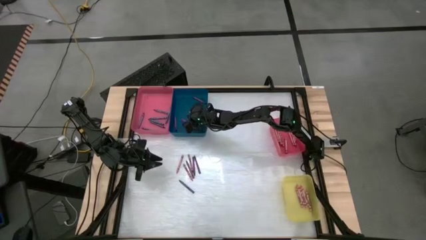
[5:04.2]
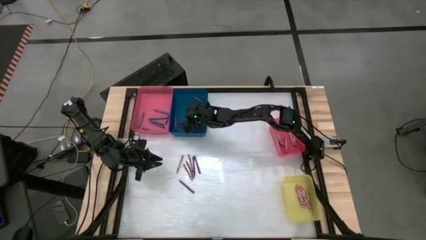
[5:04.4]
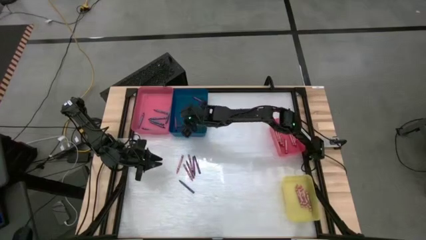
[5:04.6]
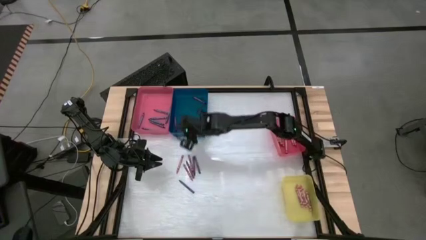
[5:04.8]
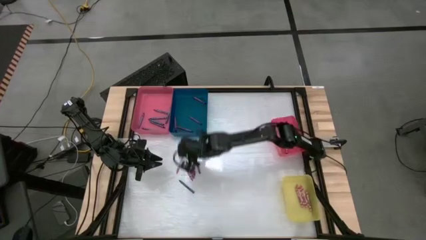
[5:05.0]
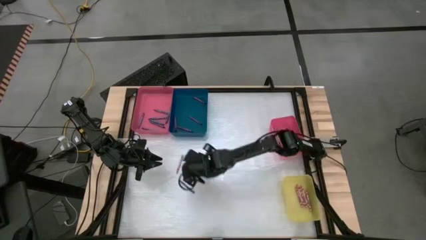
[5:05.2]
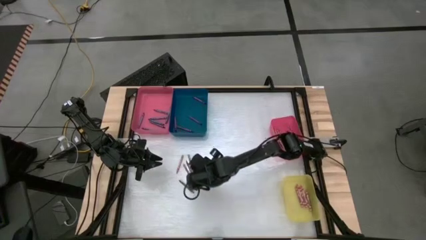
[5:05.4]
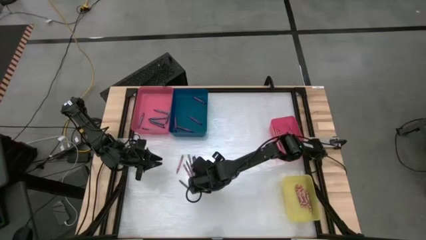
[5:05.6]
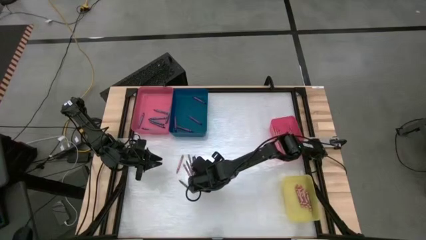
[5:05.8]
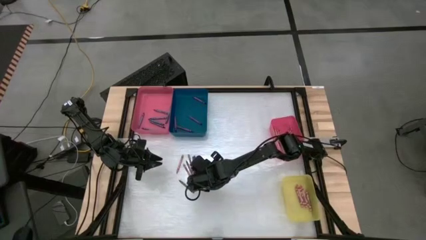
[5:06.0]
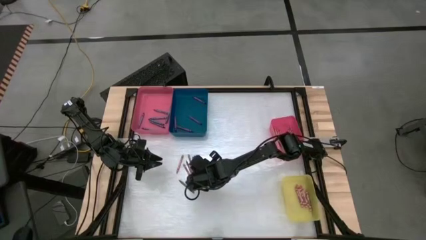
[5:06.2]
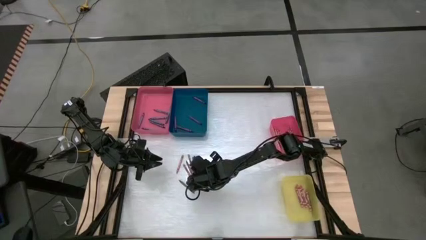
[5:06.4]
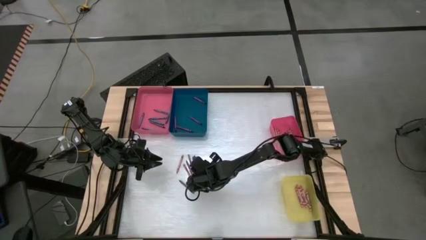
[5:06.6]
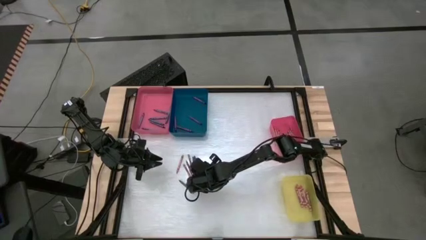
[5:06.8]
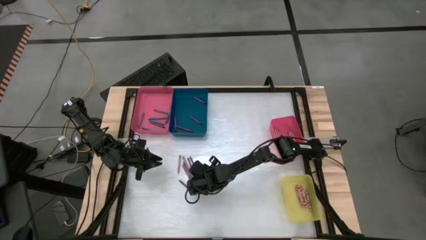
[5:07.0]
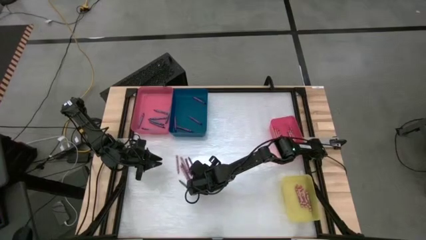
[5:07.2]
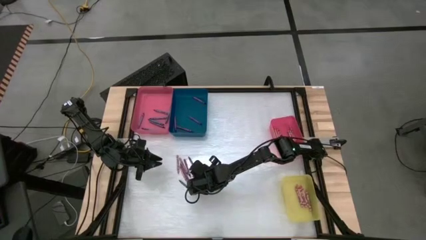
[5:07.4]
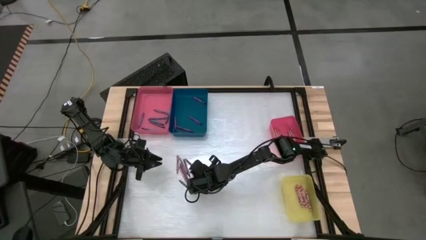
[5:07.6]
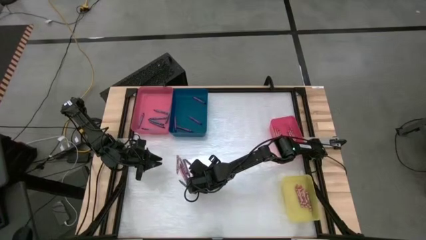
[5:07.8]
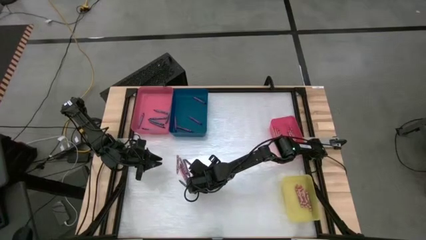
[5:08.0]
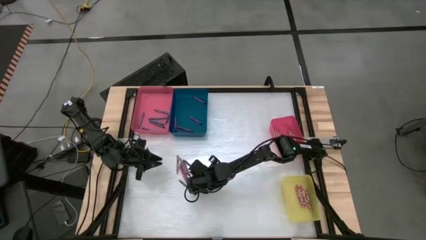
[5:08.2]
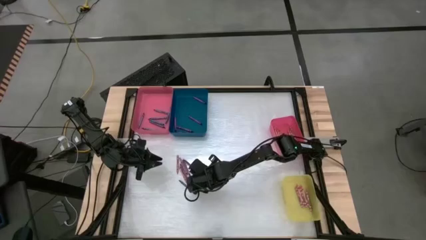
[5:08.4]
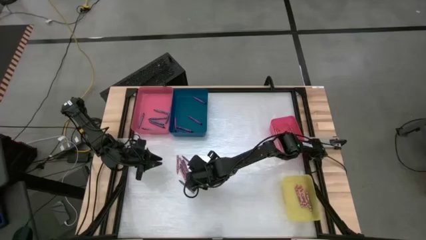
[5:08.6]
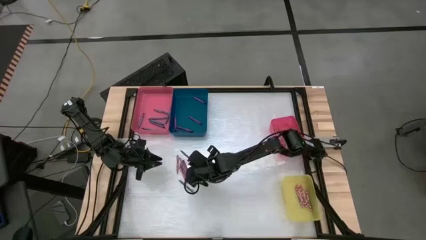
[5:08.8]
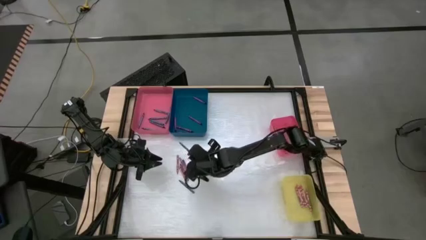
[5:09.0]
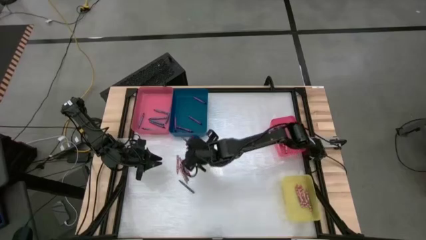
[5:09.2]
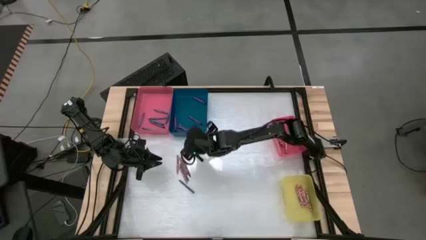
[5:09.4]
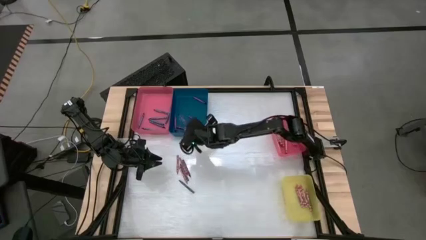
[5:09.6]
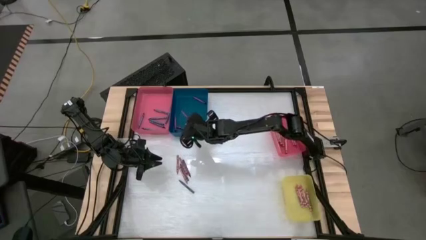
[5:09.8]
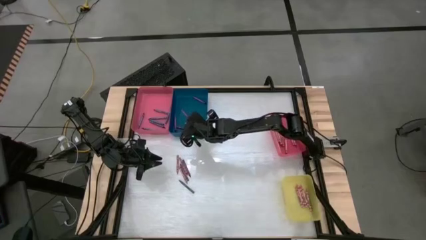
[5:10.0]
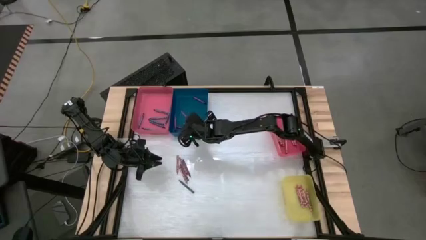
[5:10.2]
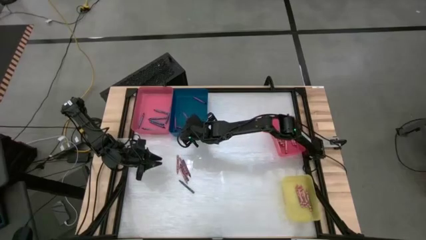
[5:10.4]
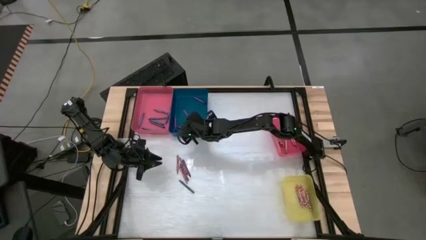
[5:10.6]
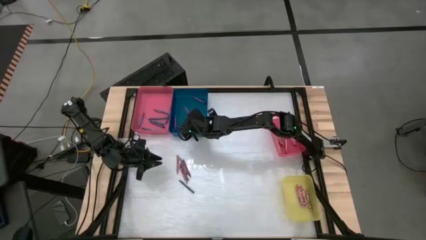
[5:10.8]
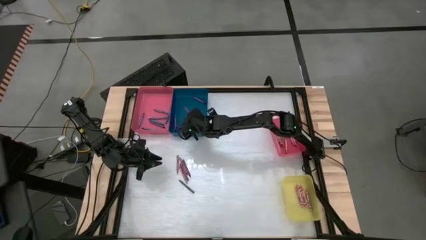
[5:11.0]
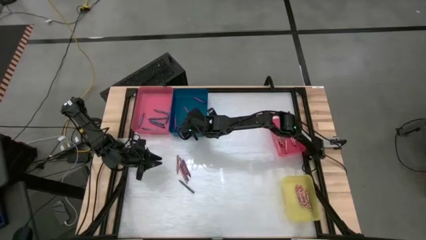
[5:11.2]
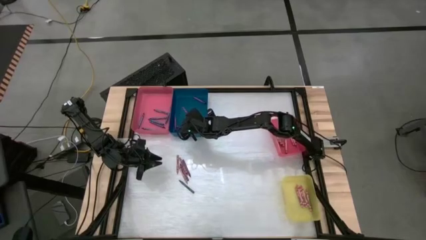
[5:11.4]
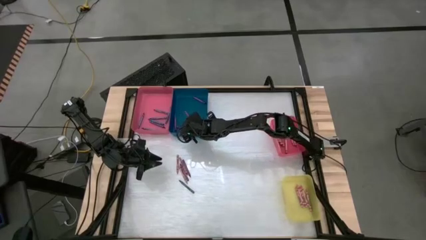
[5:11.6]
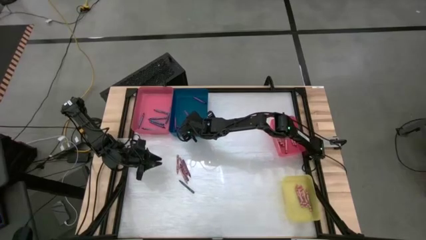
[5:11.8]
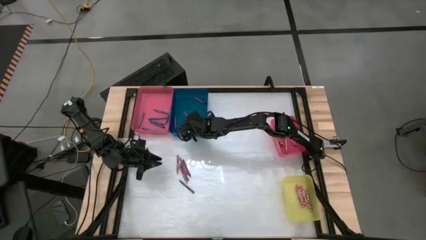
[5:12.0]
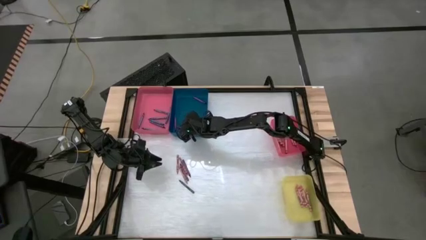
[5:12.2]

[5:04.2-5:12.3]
Task: Sort crayons
Put the purple crayon into the blue bin

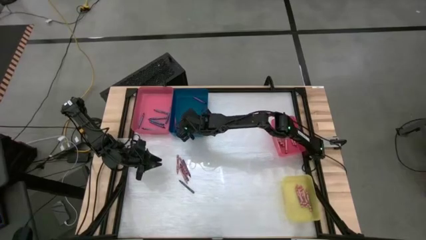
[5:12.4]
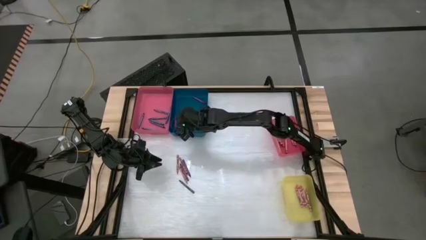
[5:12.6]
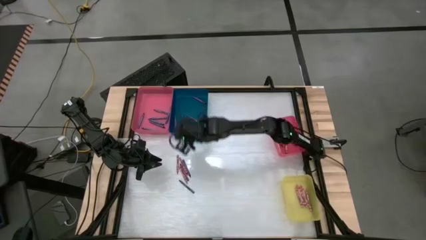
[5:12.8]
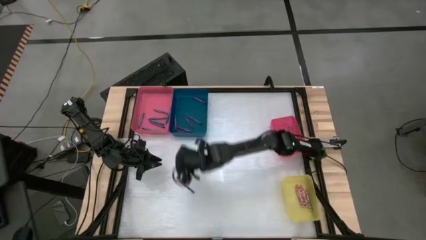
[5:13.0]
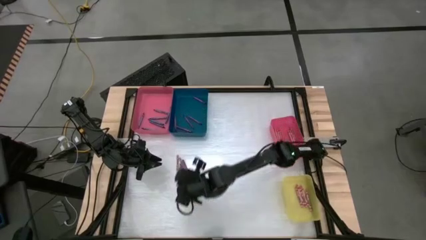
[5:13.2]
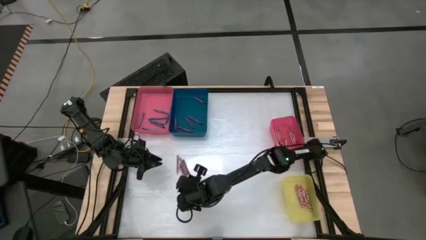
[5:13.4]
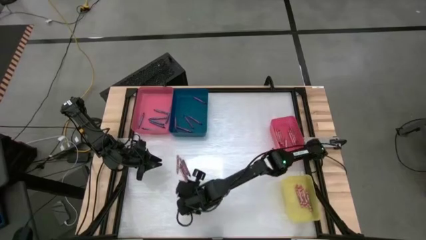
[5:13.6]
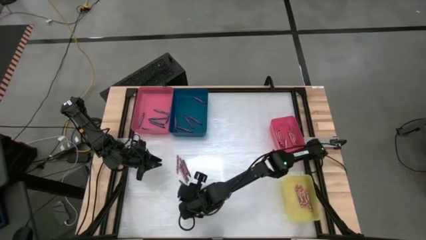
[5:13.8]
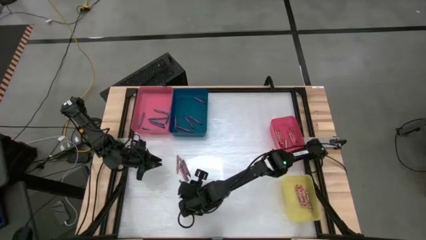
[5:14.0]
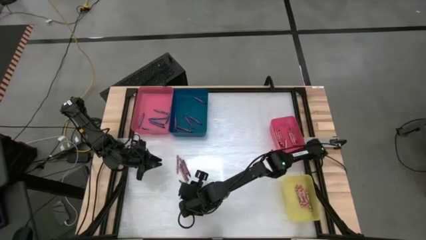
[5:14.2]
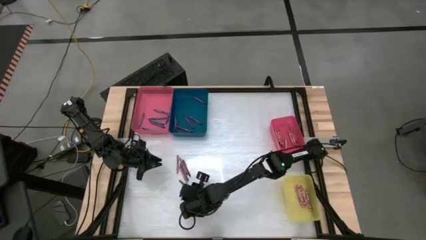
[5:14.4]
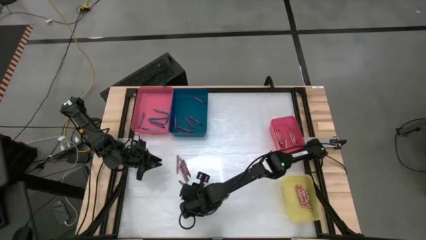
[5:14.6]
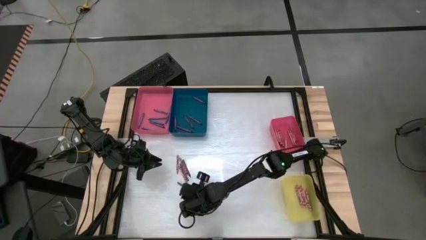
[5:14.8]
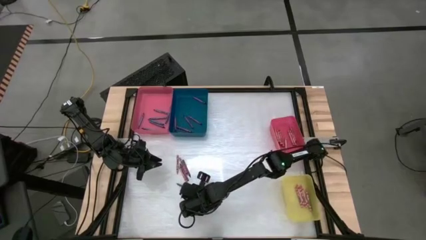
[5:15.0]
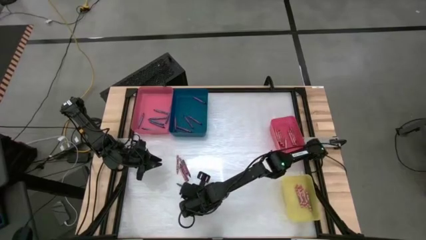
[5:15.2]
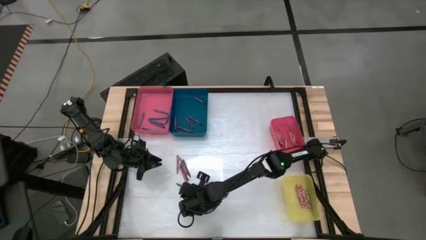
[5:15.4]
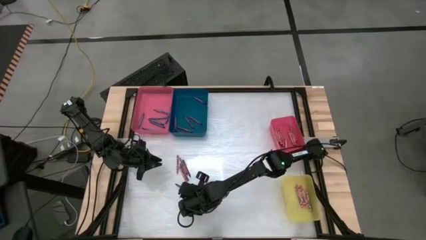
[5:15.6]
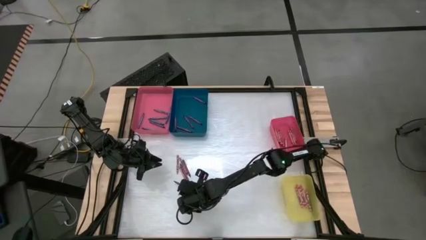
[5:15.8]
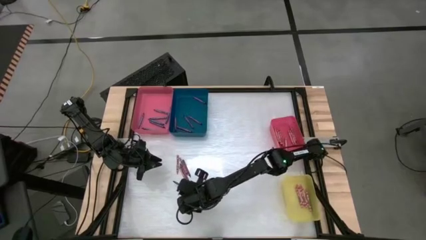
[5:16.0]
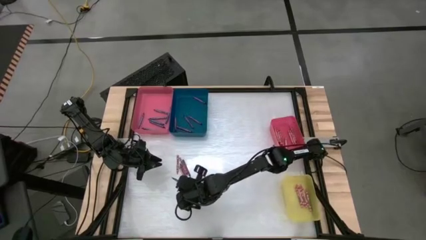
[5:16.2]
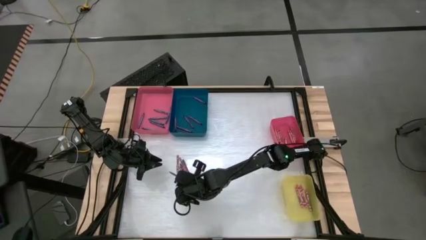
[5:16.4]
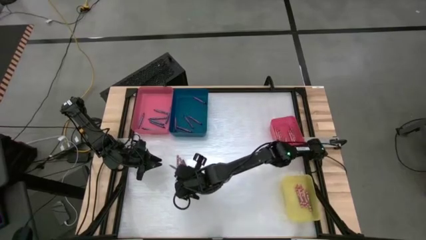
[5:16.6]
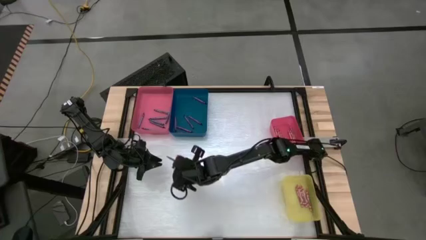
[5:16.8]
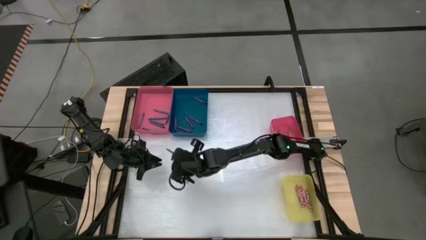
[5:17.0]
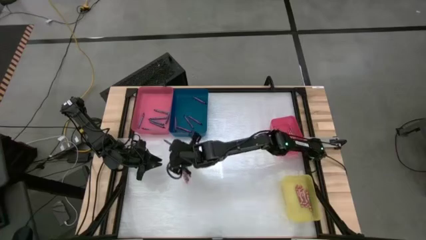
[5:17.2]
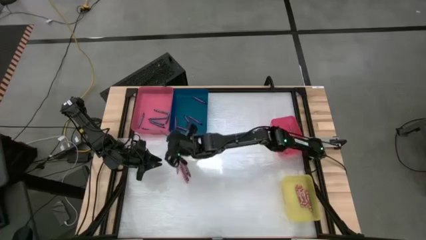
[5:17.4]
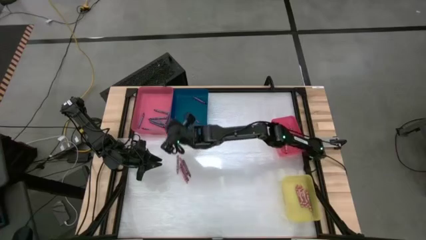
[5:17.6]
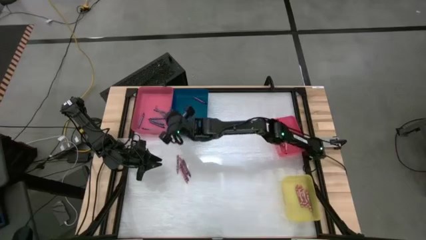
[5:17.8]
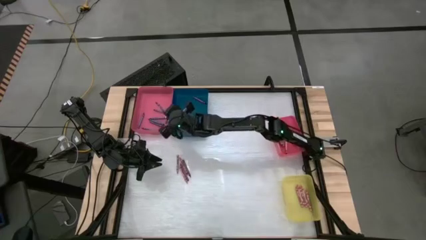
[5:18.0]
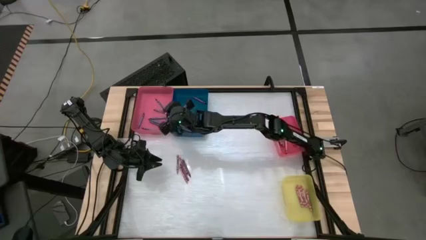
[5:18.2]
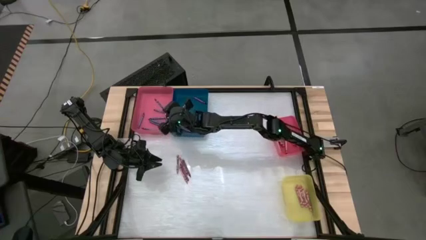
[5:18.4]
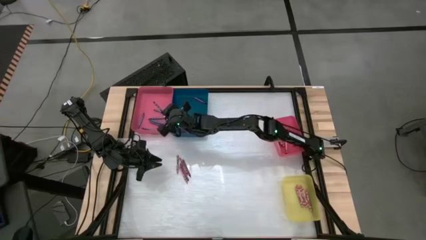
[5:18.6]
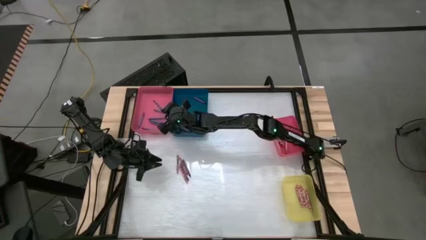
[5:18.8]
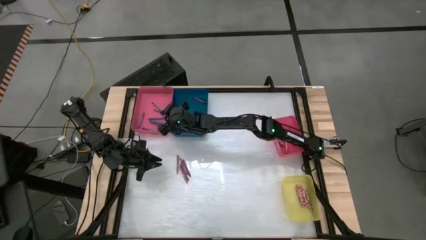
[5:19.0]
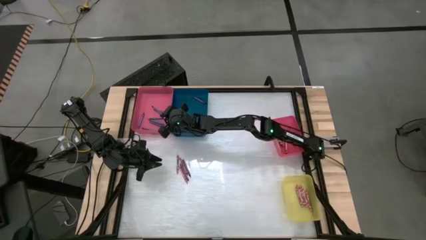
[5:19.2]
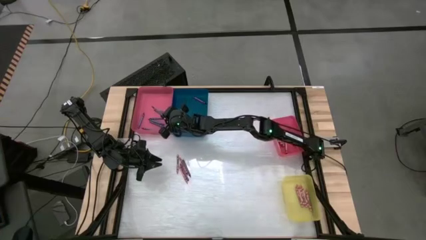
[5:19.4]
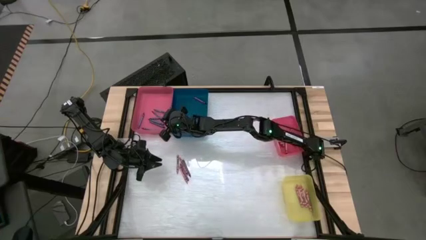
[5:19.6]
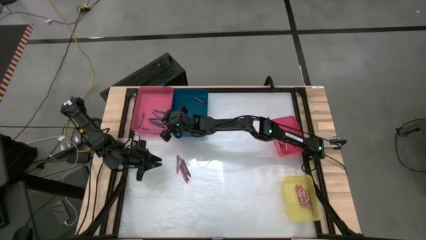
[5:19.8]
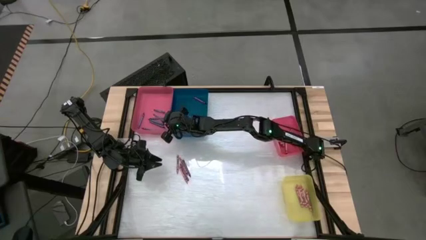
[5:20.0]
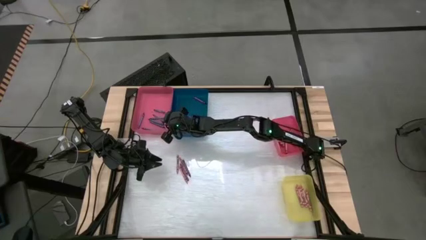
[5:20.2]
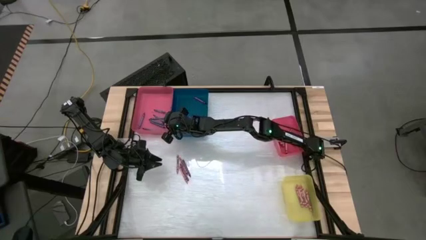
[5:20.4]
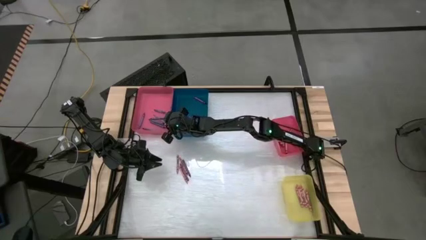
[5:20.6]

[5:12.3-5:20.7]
Put the blue crayon into the large red bin

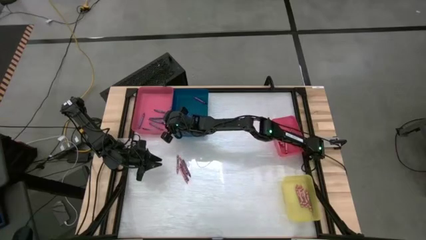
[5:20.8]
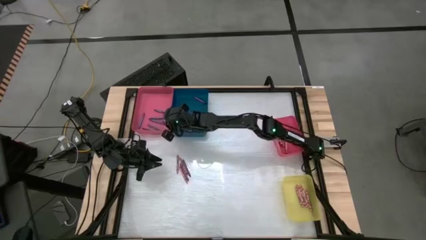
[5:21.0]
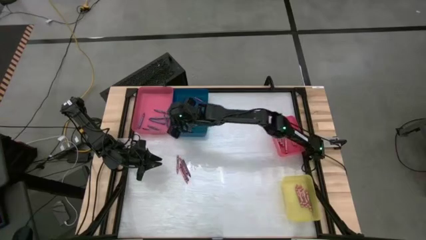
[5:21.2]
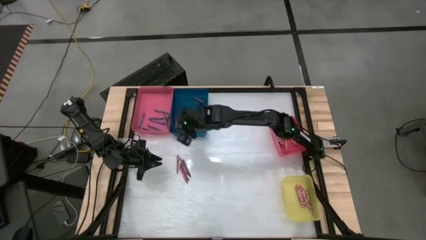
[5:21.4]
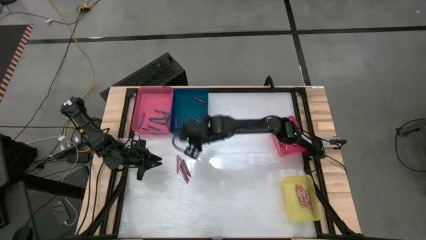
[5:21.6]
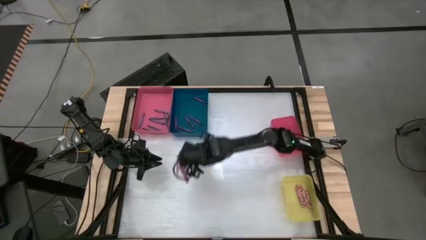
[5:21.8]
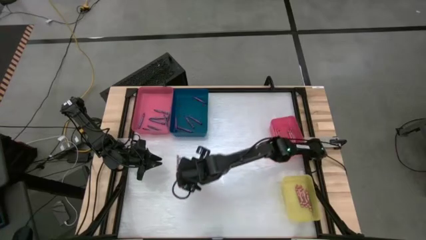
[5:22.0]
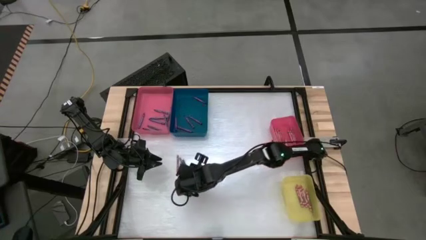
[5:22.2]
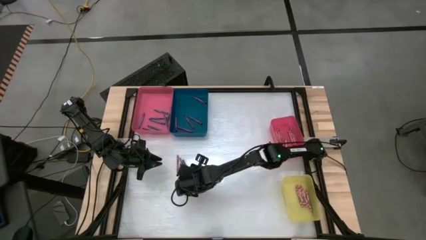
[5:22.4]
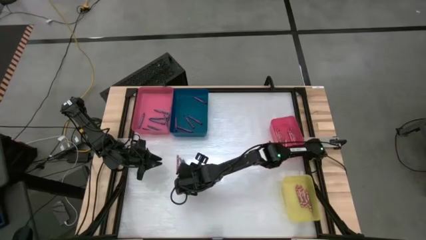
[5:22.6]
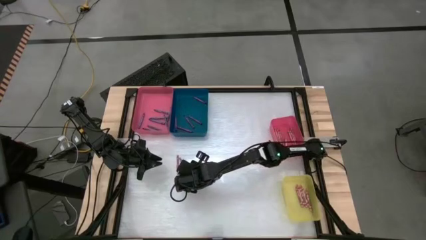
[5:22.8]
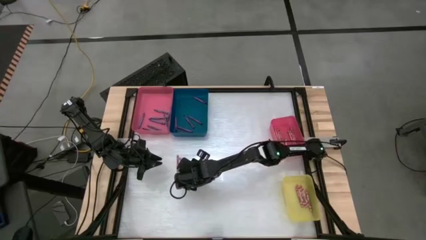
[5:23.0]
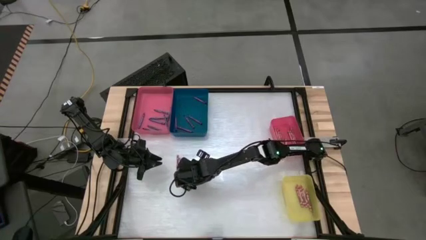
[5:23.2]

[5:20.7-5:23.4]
Put the purple crayon into the blue bin
